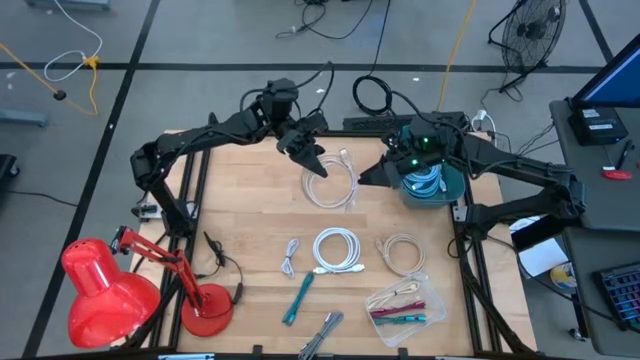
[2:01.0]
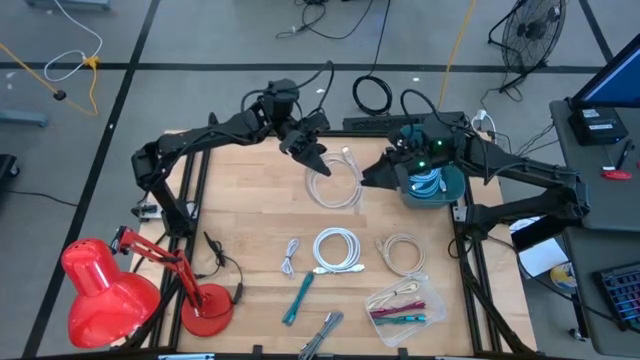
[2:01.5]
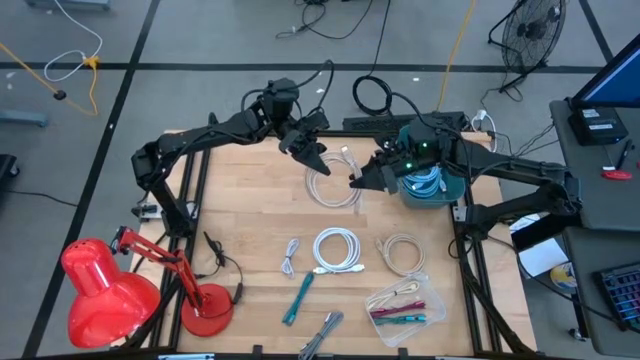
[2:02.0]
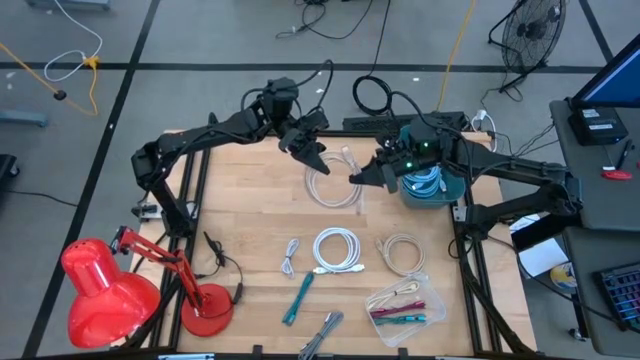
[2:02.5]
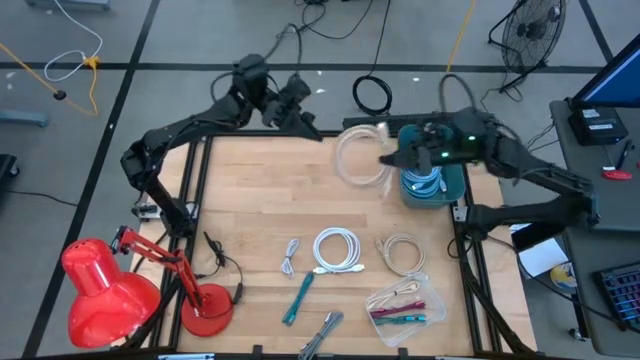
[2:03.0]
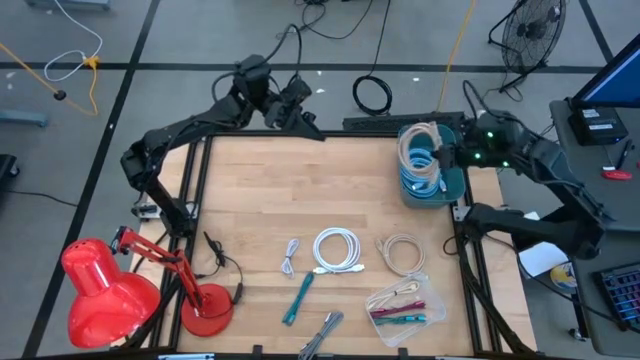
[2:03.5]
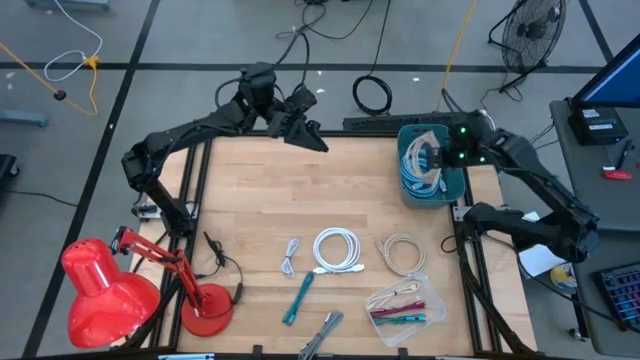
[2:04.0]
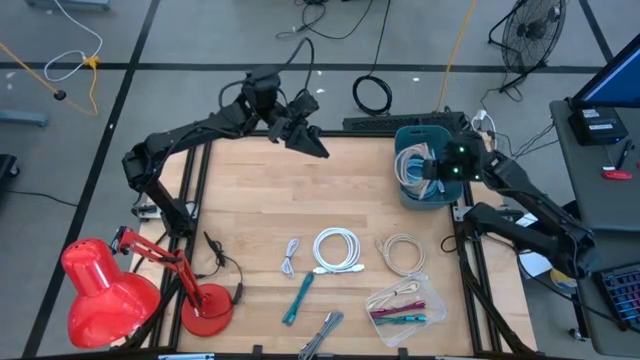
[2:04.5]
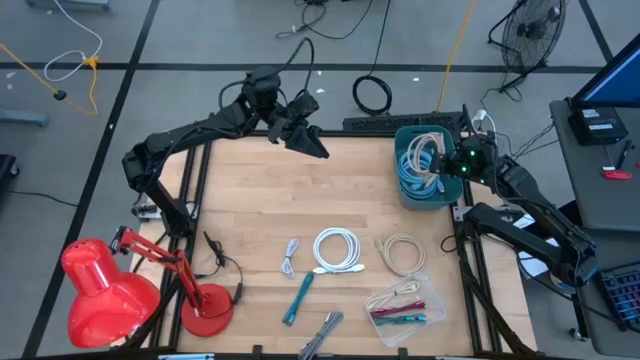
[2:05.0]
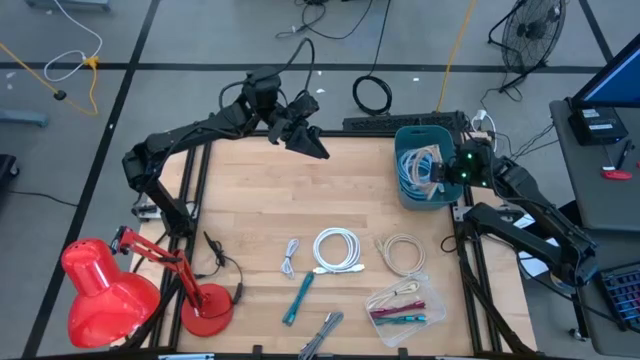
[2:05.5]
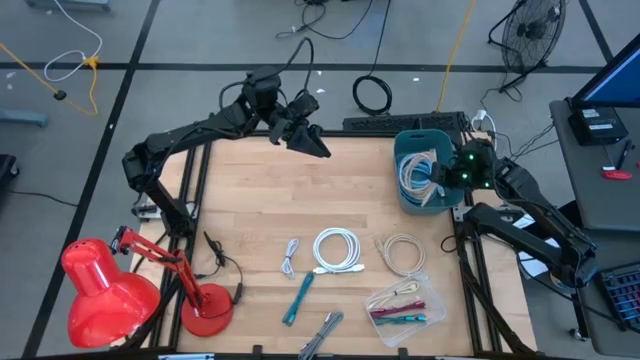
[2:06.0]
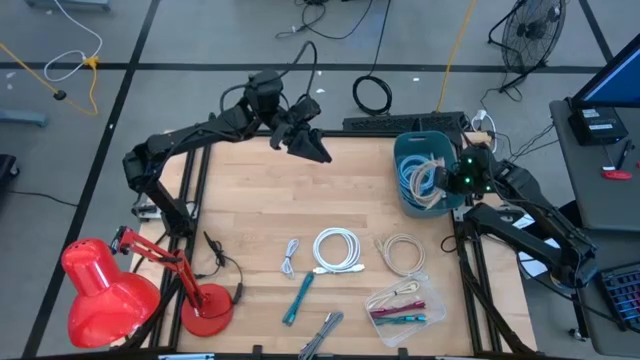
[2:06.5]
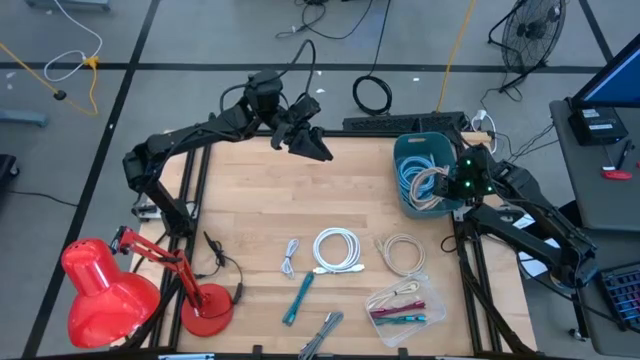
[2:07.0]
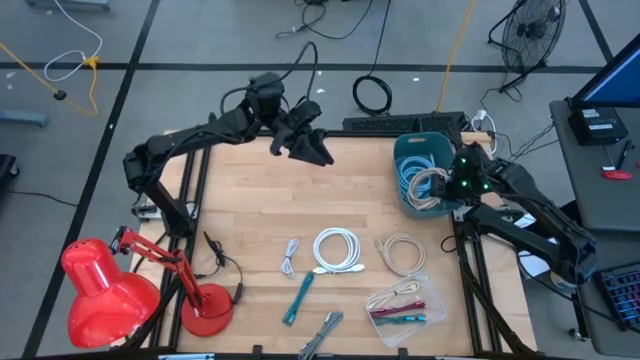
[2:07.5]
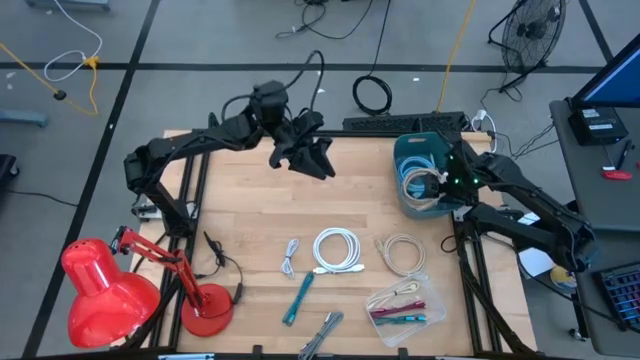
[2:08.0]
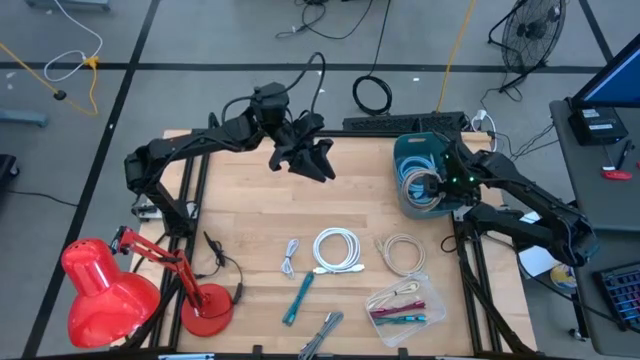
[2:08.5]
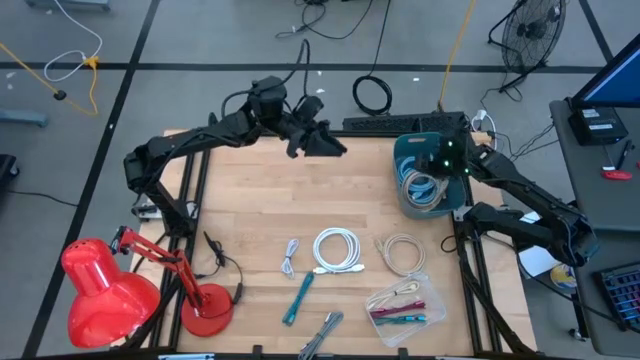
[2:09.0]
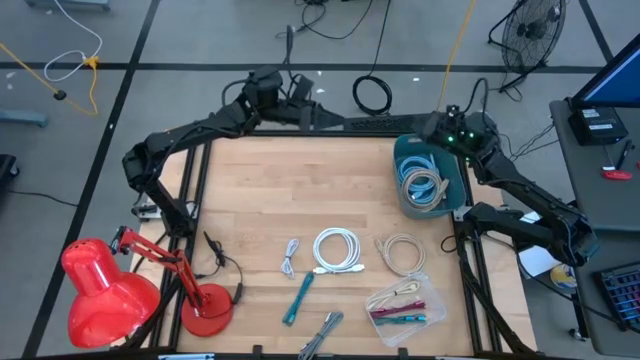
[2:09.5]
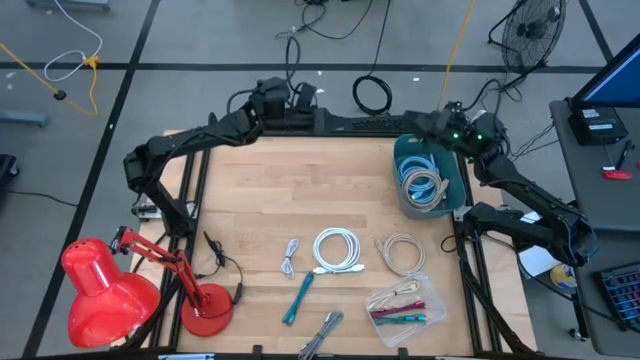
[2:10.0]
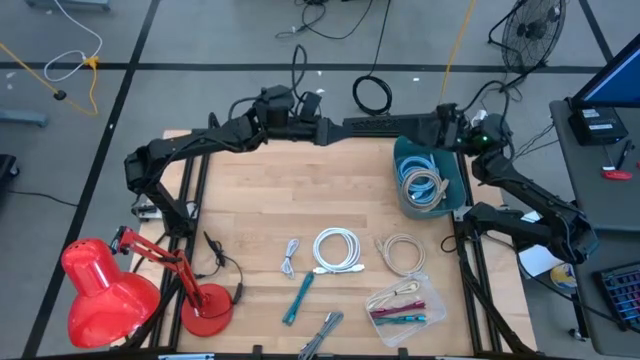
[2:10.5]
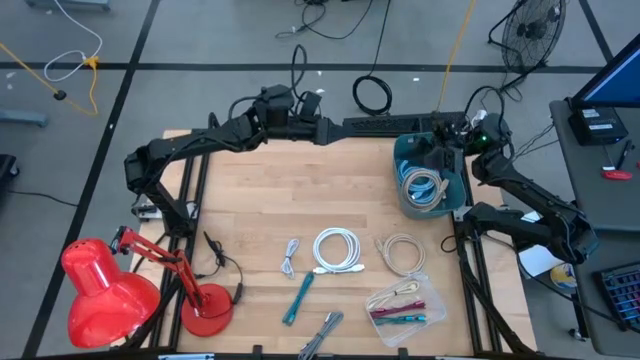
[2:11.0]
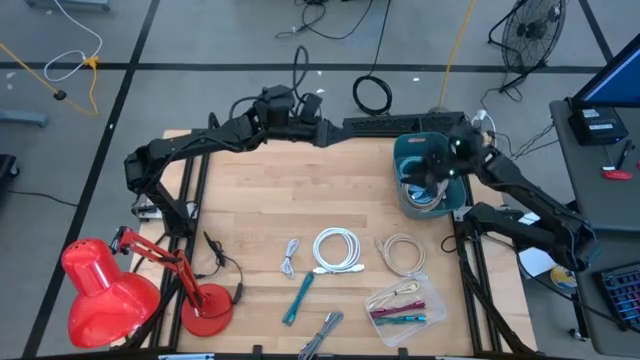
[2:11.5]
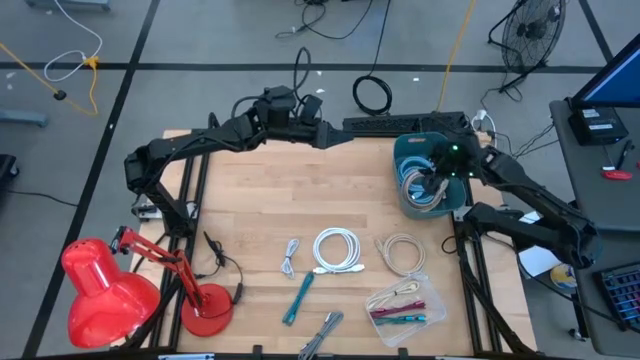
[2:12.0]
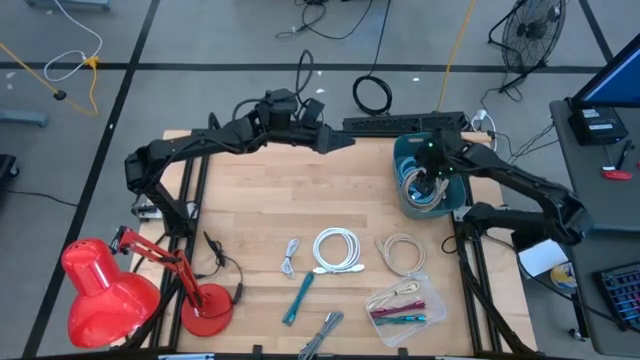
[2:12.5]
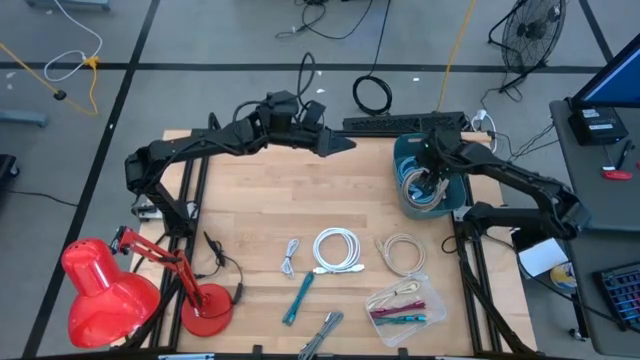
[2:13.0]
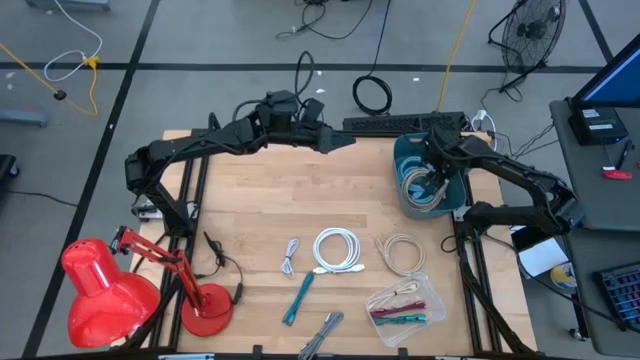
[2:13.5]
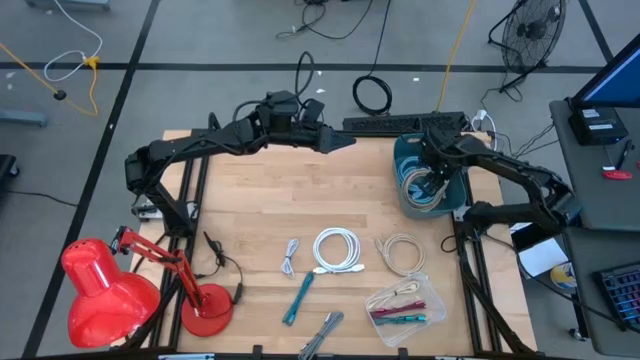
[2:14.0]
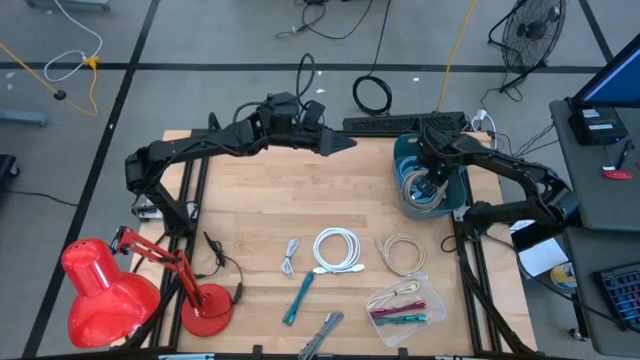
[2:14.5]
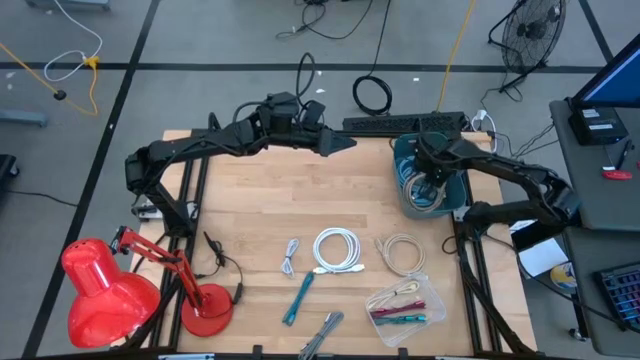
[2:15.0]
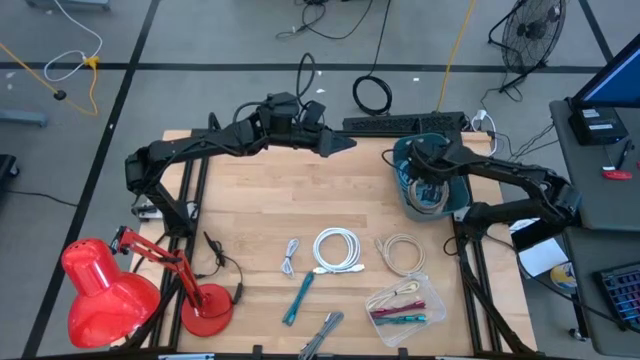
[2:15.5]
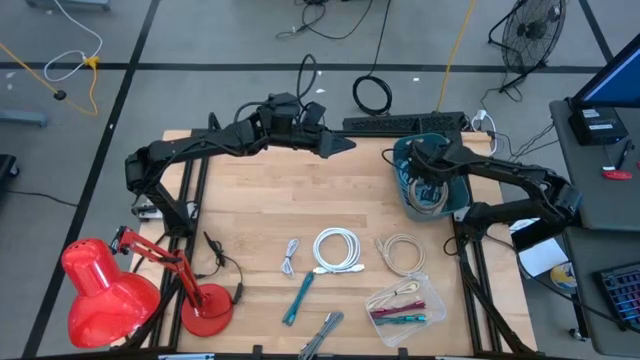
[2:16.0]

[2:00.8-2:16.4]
Task: Pick & Place USB Port
Put the left light brown hdmi cable into the blue bin

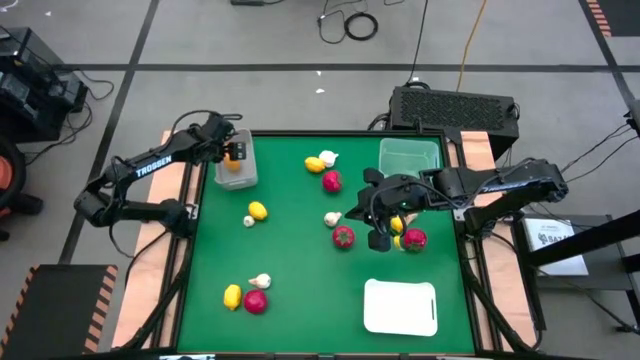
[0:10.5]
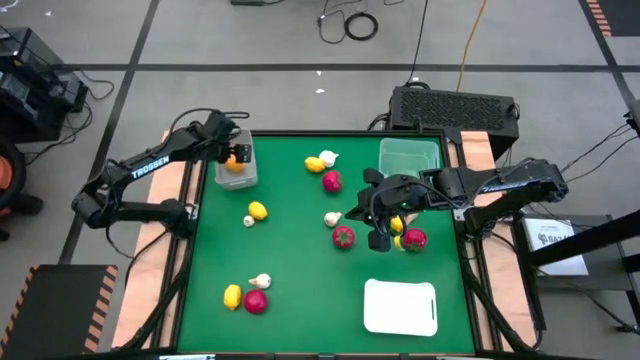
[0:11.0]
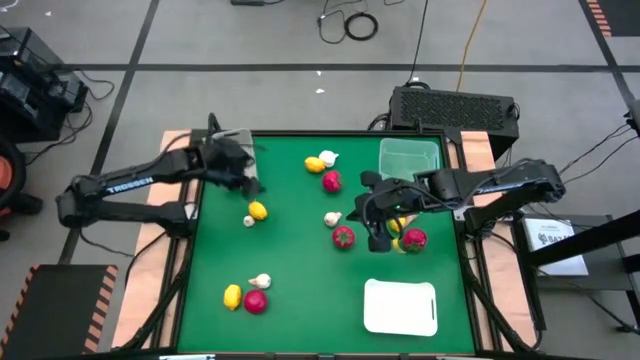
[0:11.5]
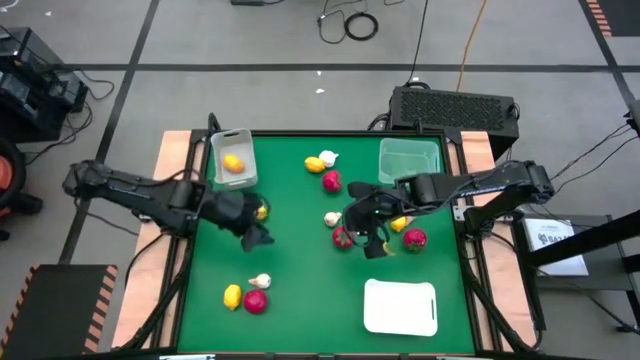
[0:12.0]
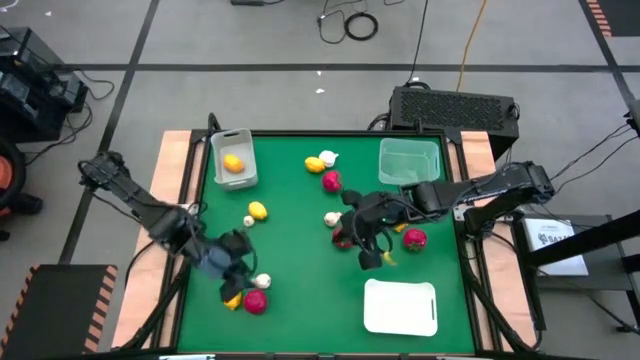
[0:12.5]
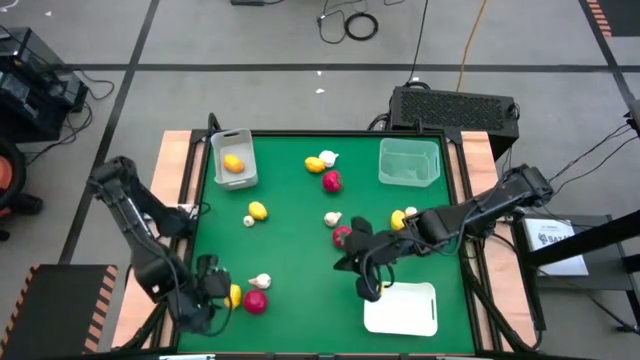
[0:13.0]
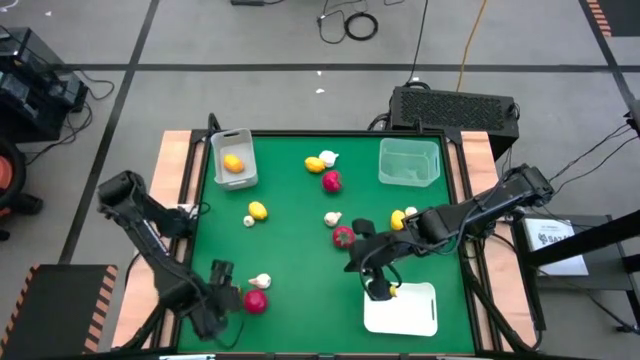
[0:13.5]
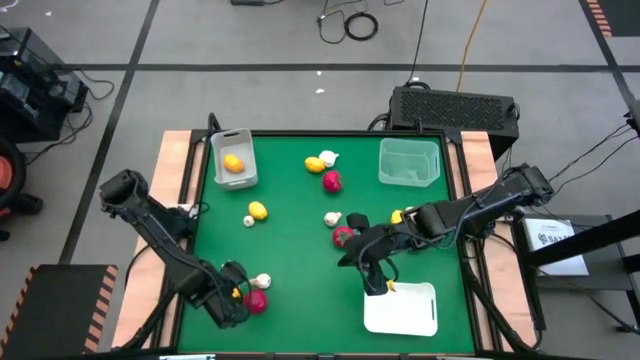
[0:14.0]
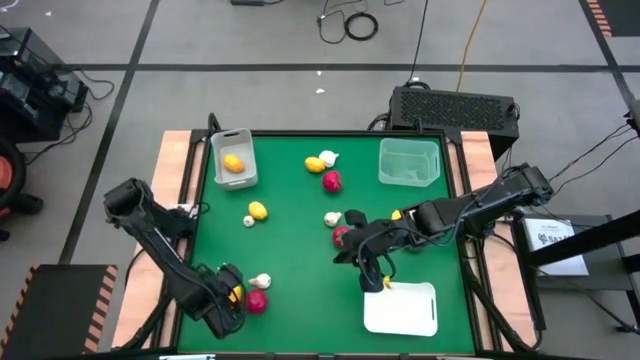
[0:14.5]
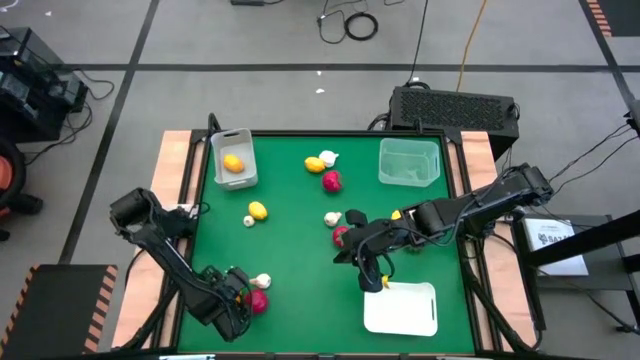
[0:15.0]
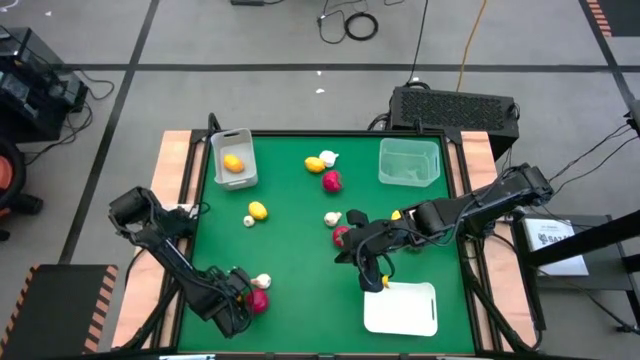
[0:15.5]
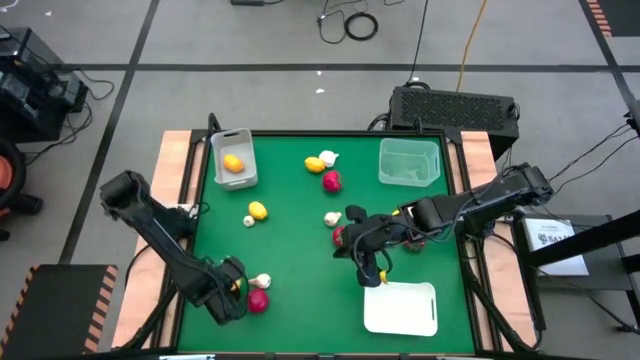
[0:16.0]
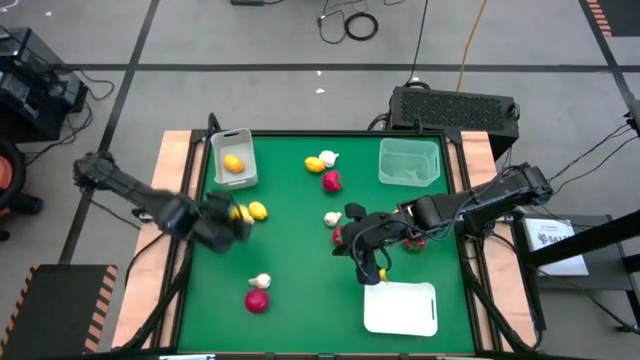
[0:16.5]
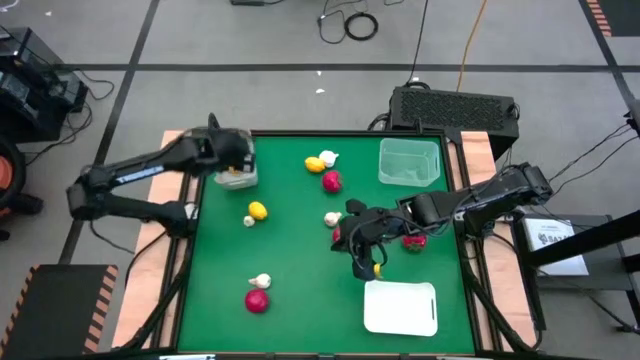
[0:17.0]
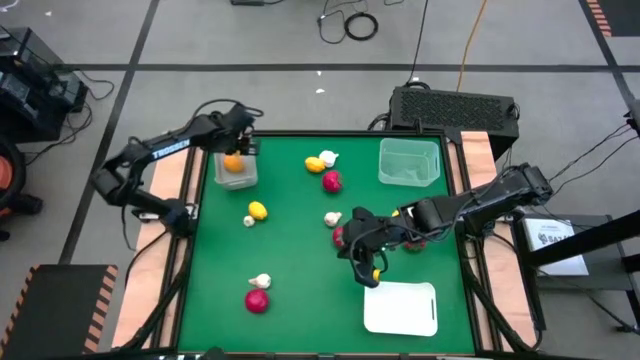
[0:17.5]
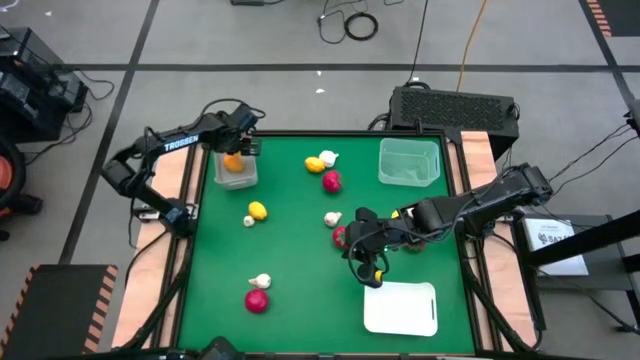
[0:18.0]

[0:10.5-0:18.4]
Task: Sort produce into baskets
Put the yellow lemon in the gray bin
